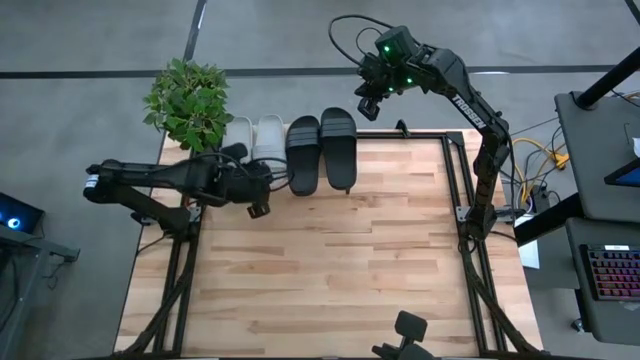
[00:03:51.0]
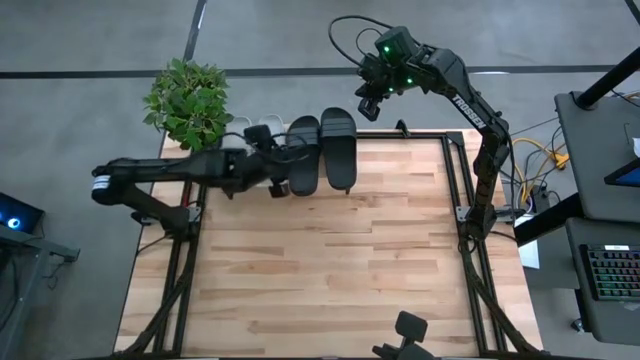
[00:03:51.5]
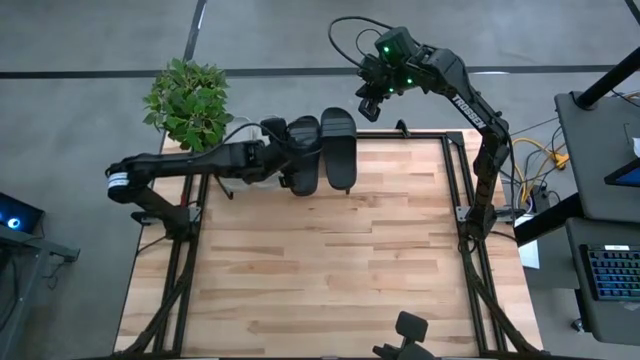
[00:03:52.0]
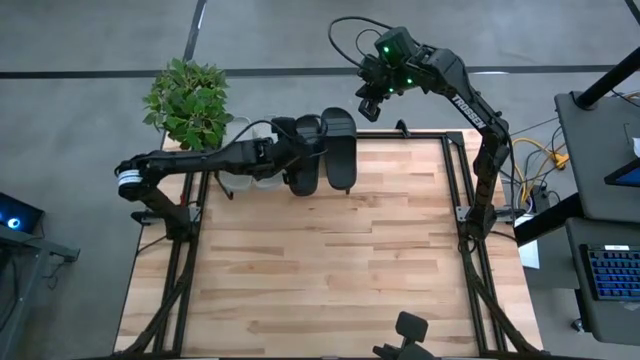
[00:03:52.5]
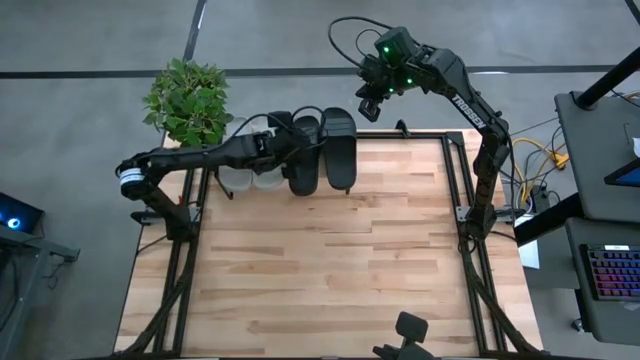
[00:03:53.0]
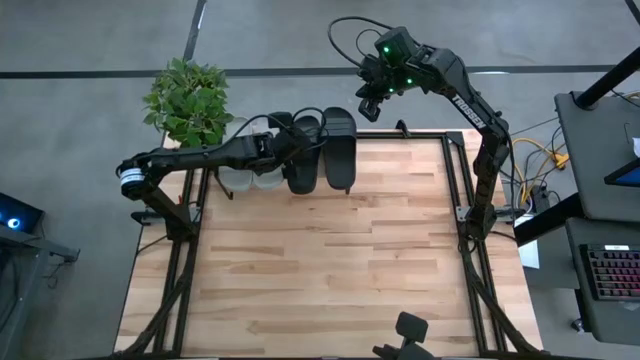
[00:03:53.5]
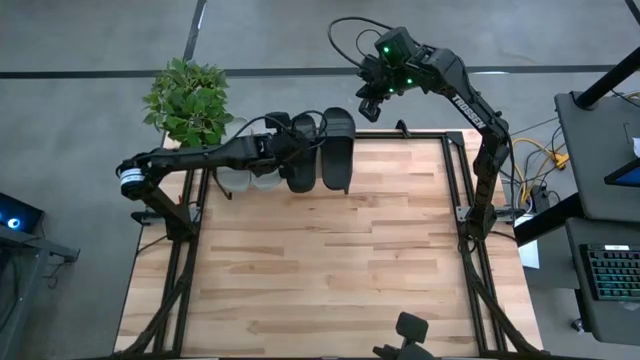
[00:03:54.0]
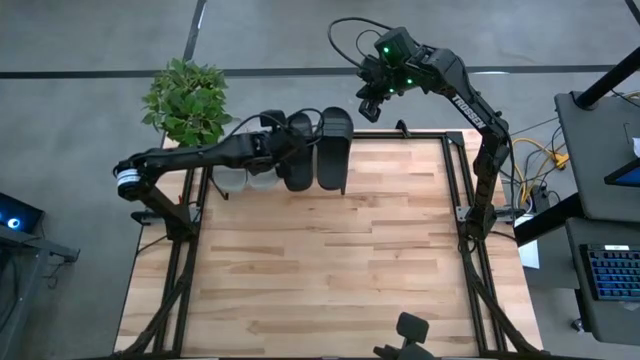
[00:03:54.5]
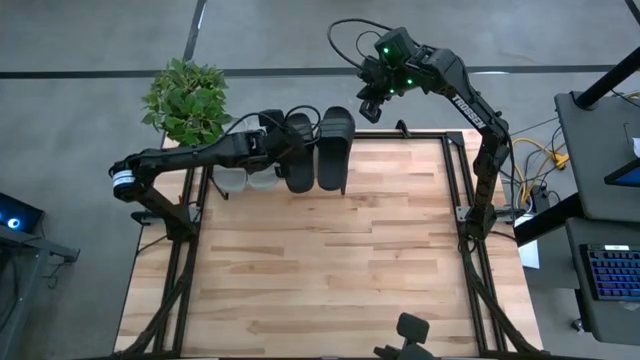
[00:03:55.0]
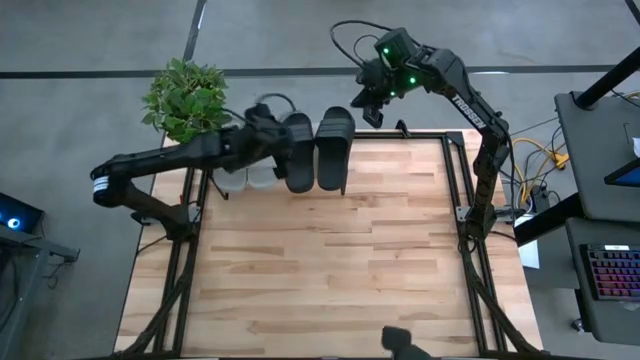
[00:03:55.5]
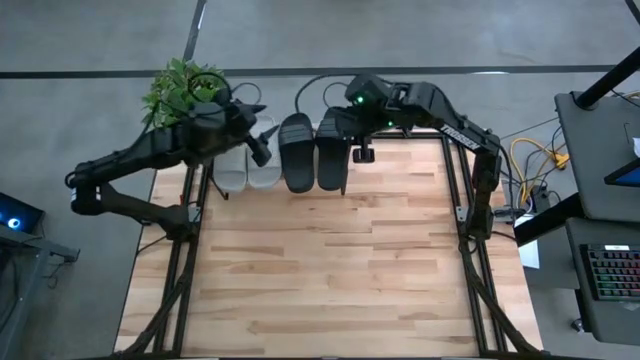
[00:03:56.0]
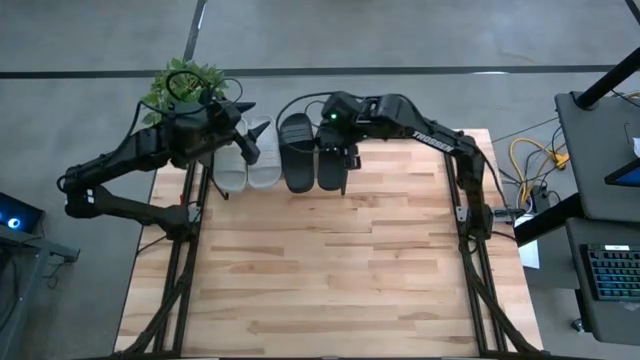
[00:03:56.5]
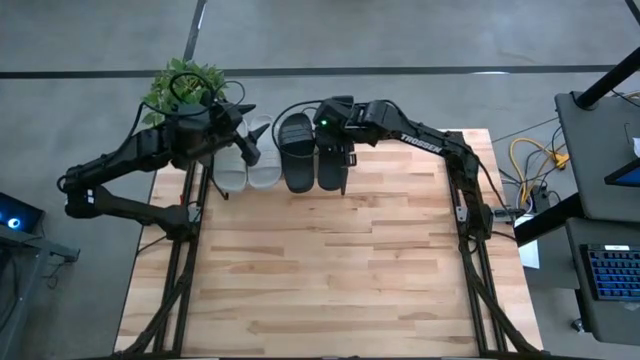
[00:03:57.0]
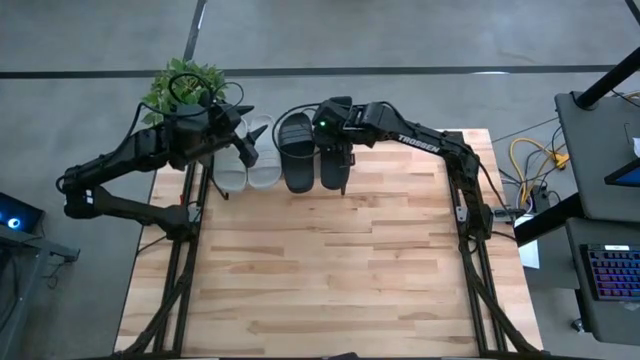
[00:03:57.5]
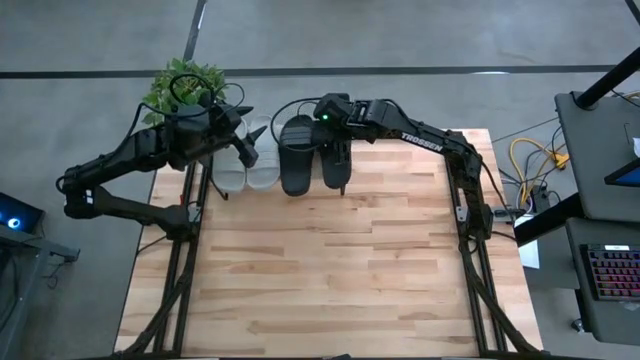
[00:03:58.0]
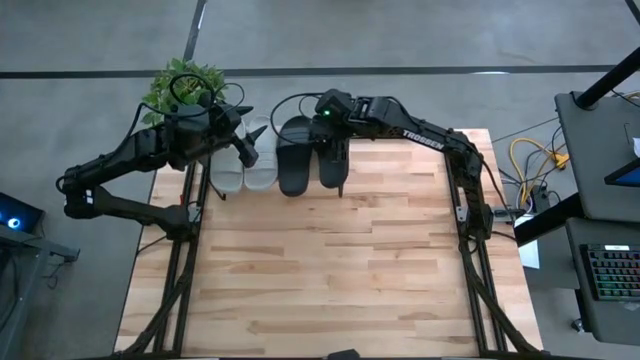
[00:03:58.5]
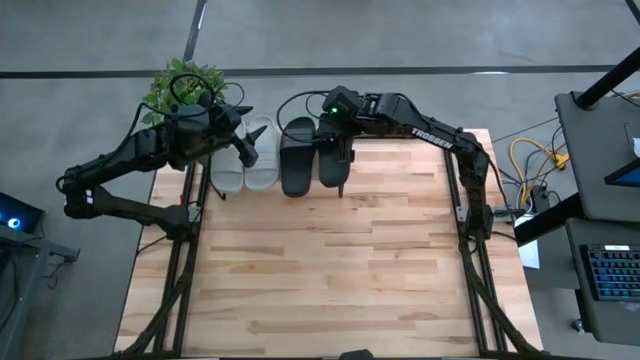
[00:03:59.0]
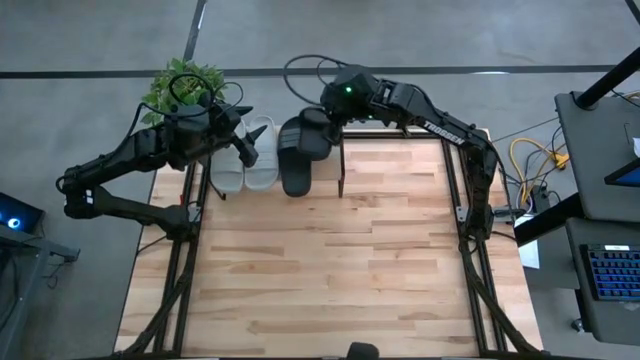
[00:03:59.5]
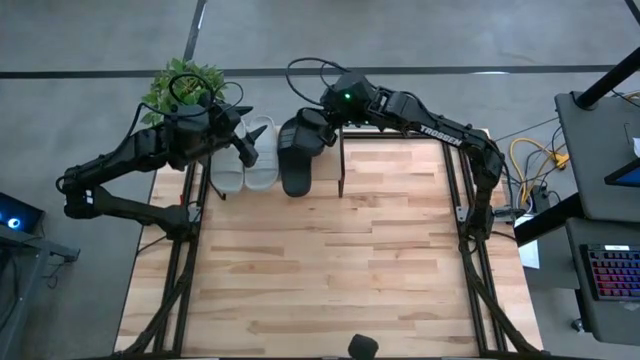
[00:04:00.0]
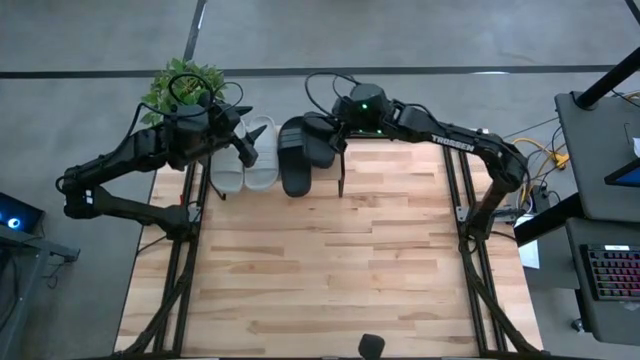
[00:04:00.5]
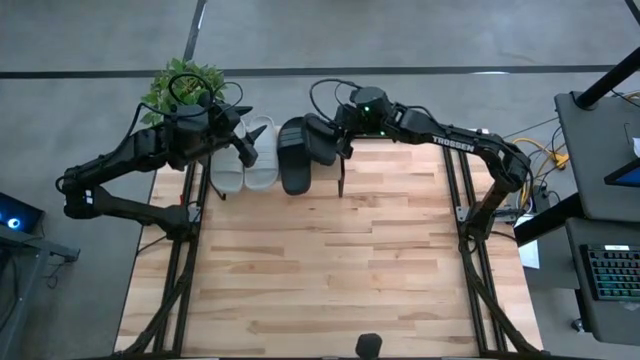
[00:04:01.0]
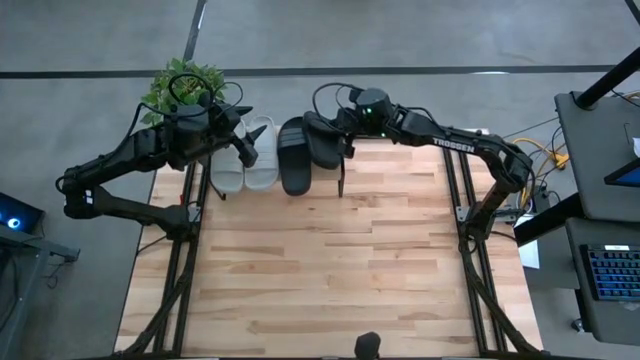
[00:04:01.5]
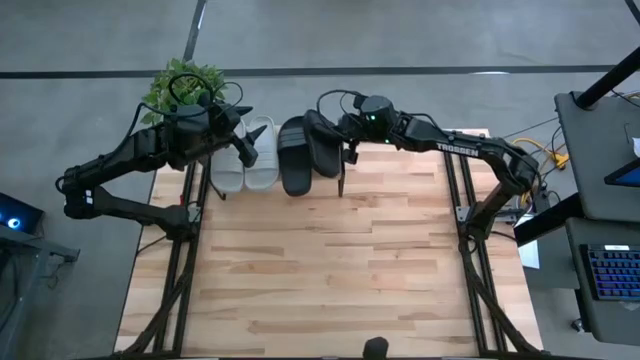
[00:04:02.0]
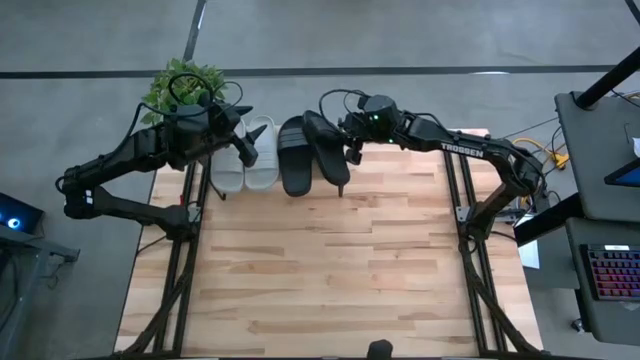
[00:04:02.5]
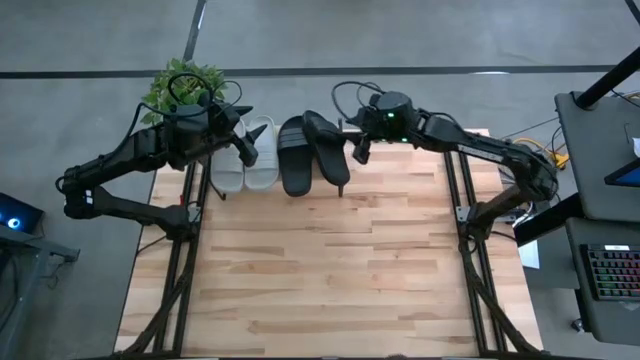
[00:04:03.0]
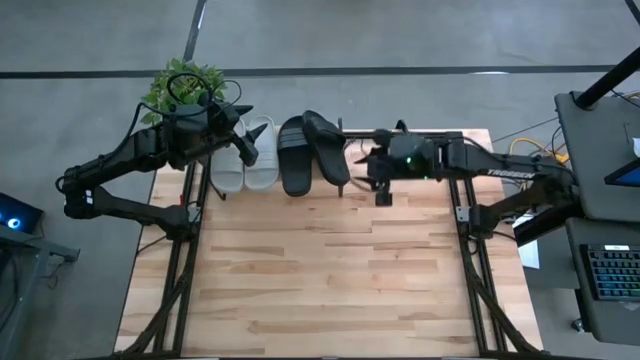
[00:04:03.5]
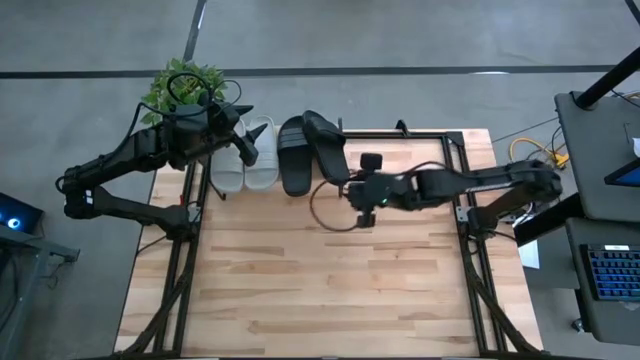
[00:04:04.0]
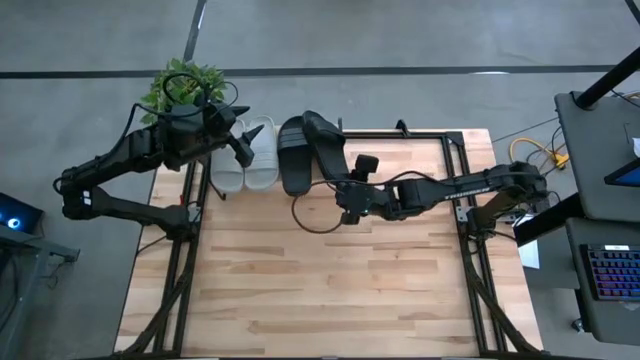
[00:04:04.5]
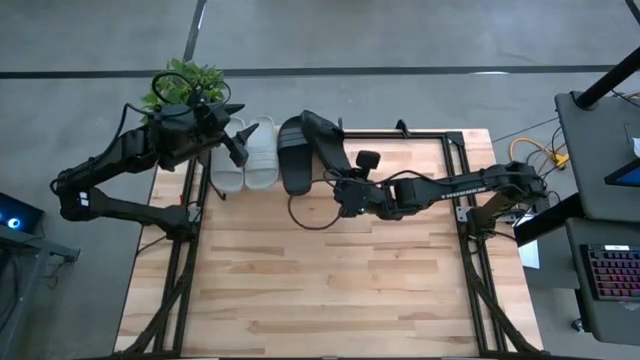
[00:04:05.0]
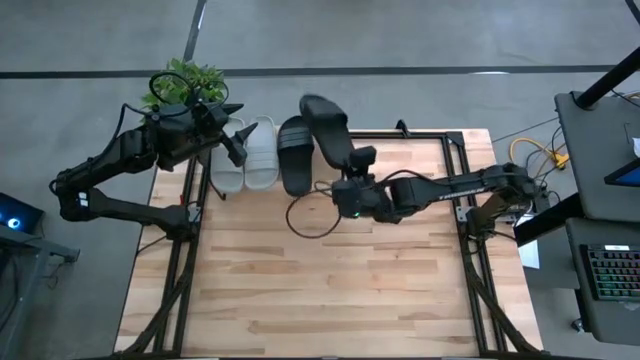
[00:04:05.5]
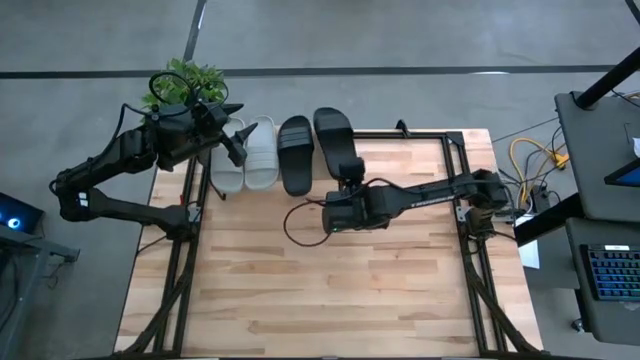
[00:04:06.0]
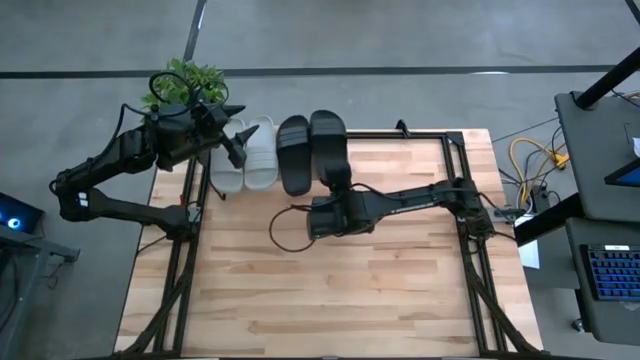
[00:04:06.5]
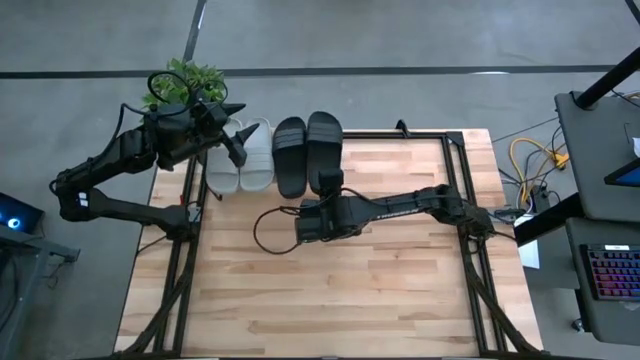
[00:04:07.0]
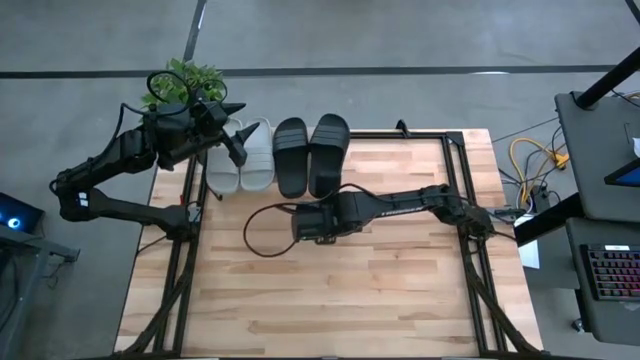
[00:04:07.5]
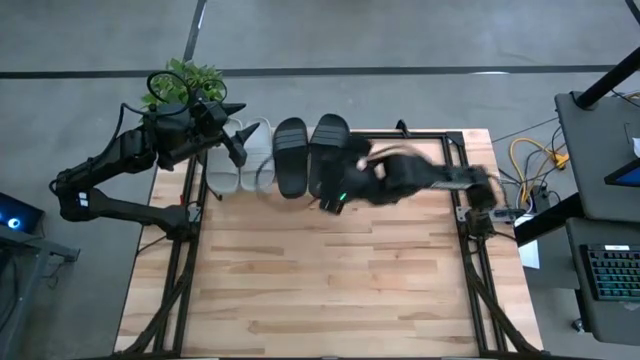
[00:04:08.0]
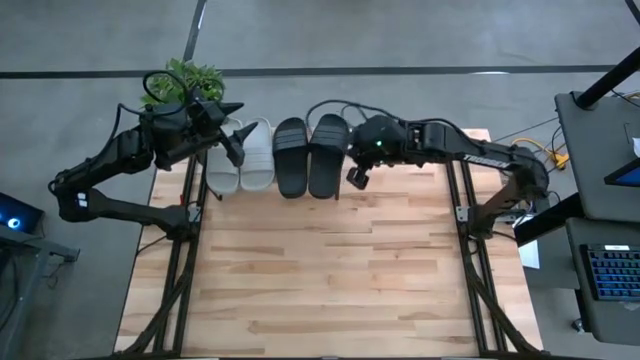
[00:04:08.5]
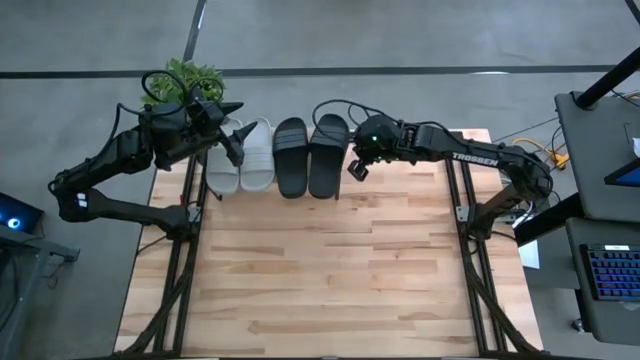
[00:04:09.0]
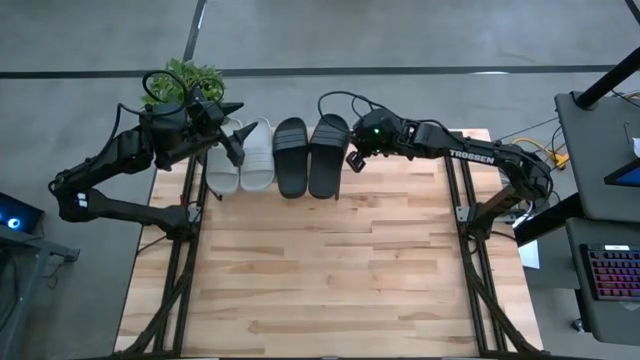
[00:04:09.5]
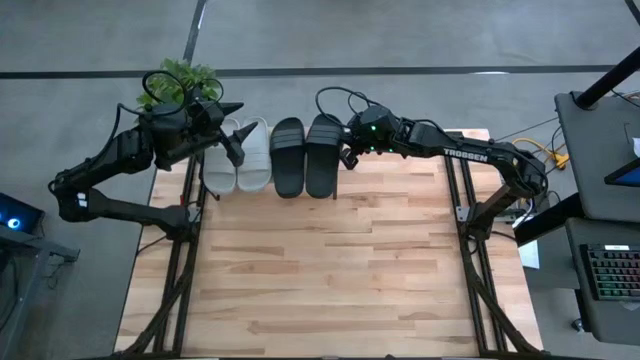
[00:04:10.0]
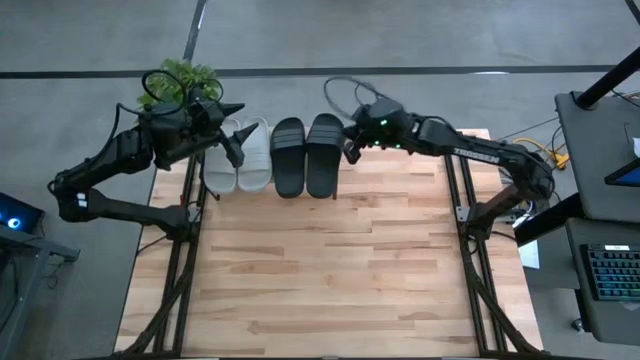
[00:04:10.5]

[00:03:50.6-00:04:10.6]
Task: Pick and place slides into the shelf
Adjust the pair of black slippers on the shelf
